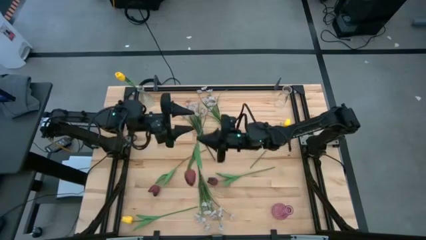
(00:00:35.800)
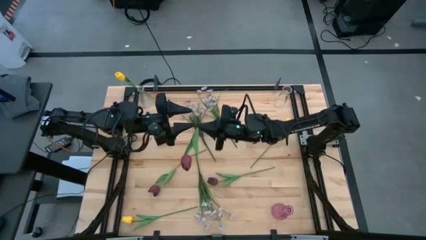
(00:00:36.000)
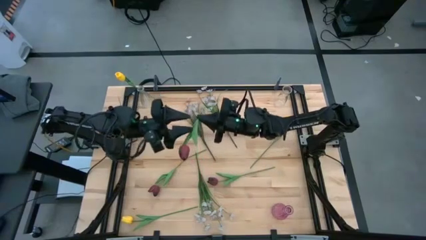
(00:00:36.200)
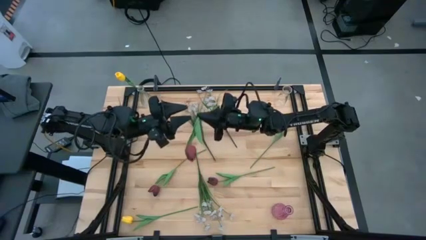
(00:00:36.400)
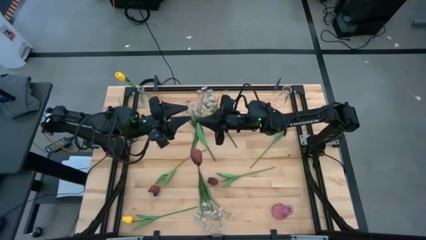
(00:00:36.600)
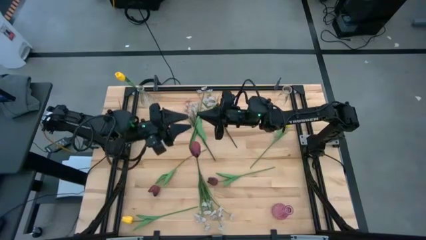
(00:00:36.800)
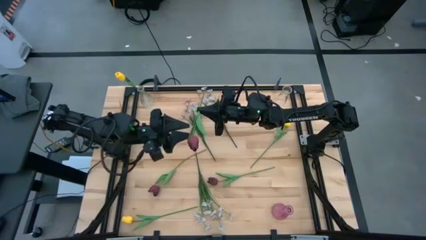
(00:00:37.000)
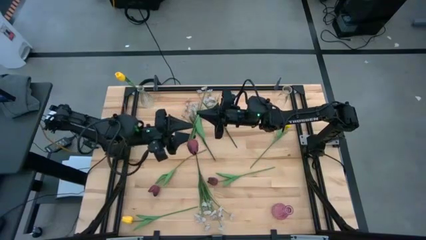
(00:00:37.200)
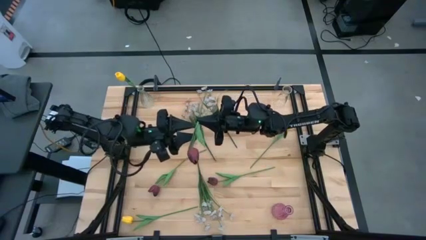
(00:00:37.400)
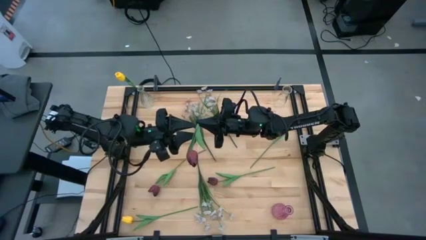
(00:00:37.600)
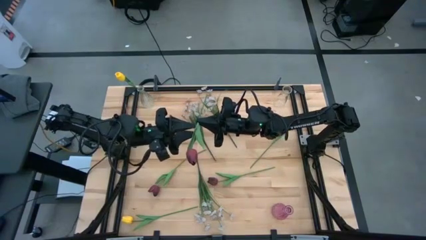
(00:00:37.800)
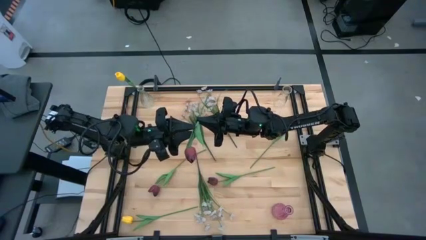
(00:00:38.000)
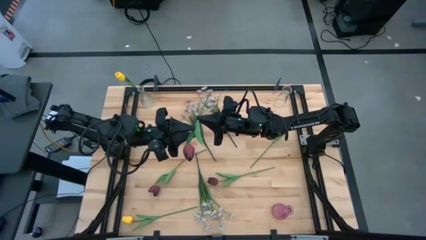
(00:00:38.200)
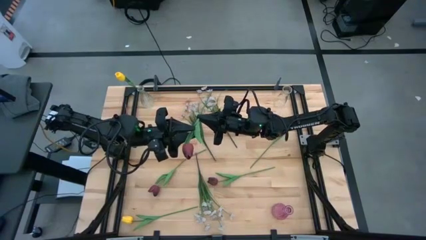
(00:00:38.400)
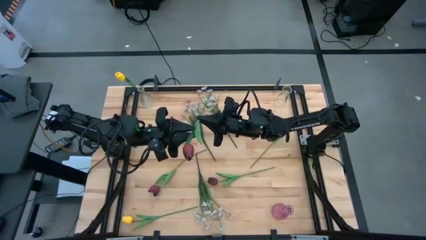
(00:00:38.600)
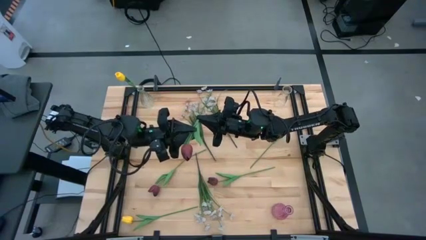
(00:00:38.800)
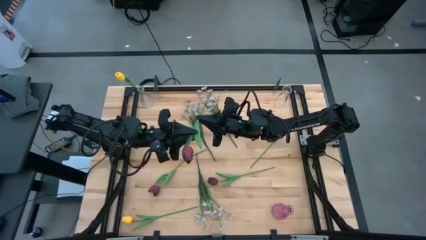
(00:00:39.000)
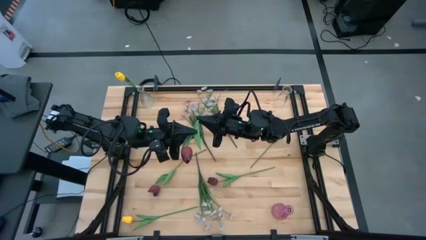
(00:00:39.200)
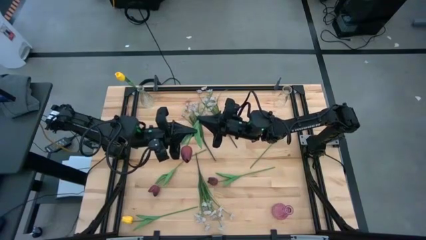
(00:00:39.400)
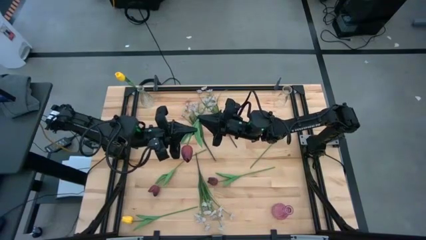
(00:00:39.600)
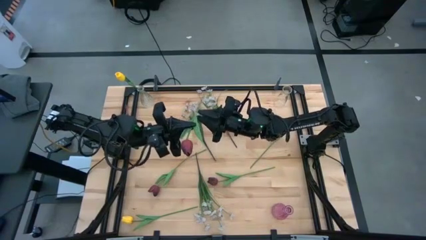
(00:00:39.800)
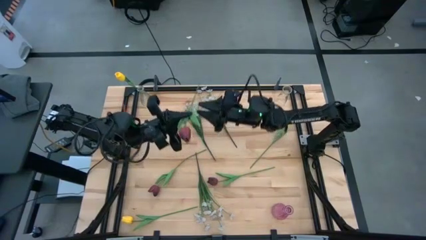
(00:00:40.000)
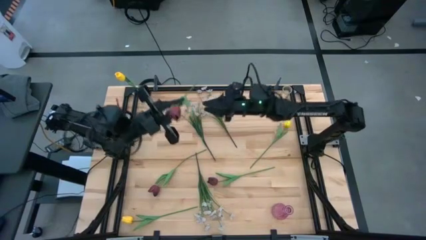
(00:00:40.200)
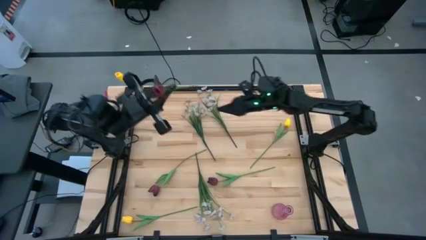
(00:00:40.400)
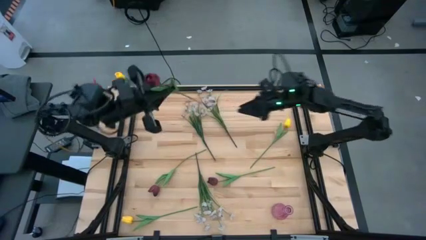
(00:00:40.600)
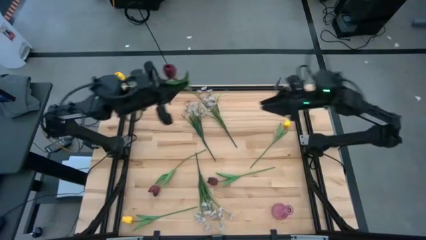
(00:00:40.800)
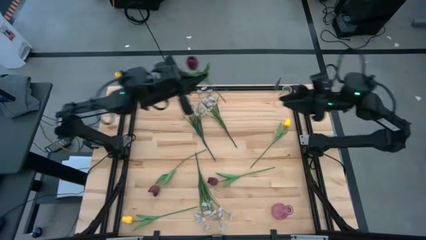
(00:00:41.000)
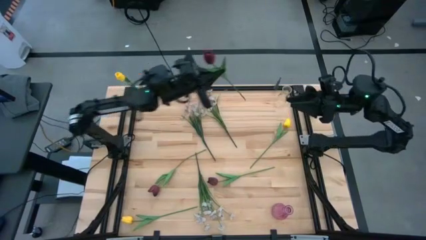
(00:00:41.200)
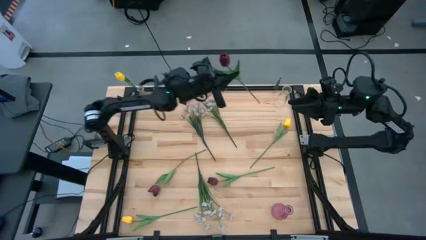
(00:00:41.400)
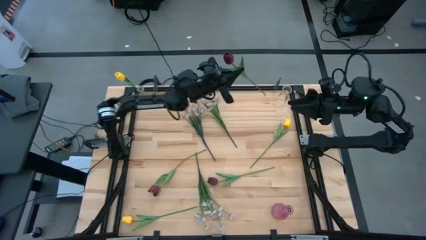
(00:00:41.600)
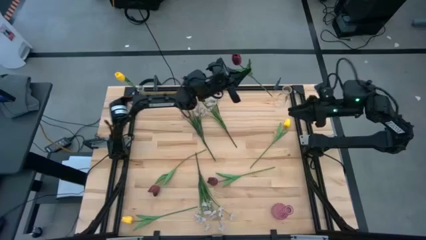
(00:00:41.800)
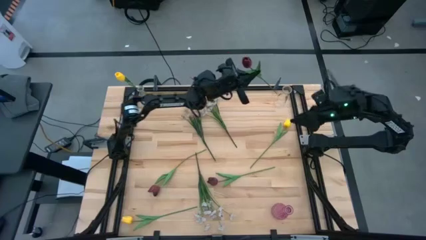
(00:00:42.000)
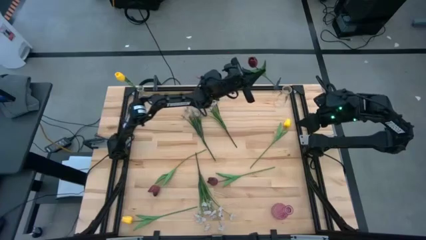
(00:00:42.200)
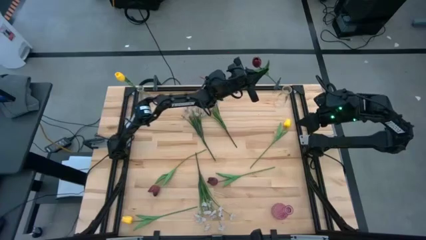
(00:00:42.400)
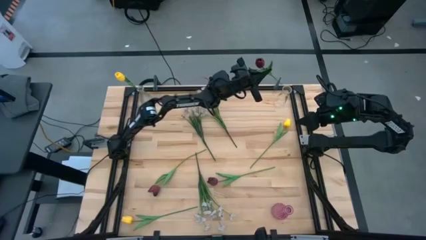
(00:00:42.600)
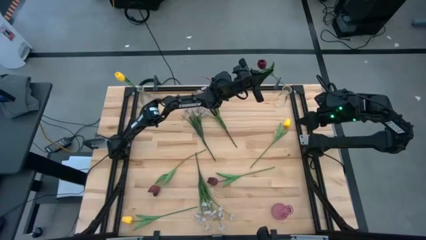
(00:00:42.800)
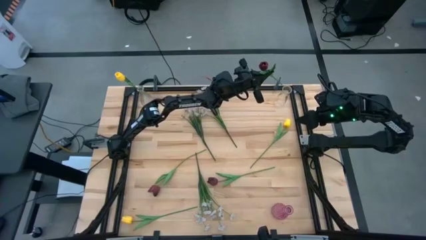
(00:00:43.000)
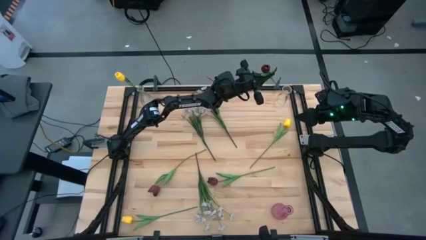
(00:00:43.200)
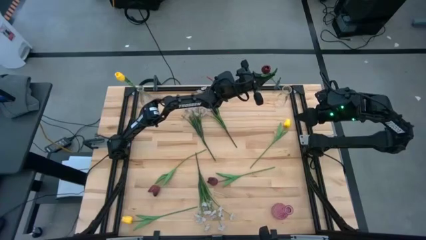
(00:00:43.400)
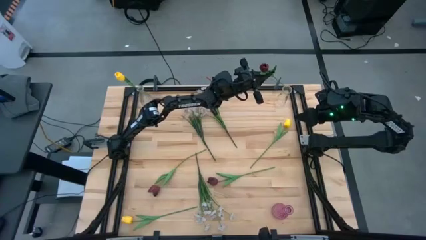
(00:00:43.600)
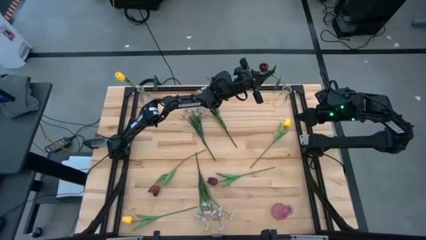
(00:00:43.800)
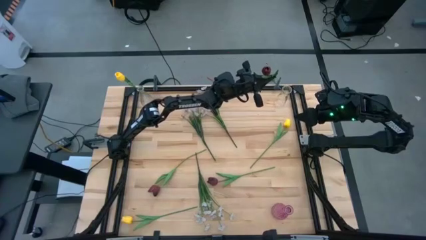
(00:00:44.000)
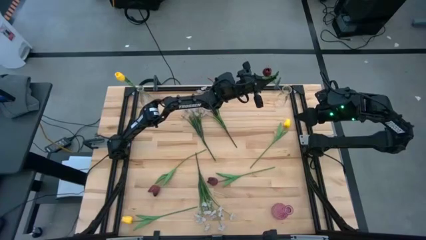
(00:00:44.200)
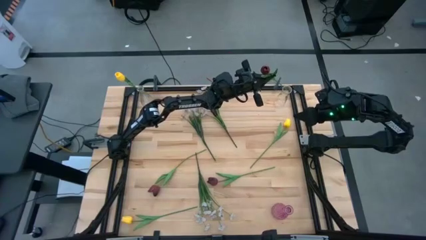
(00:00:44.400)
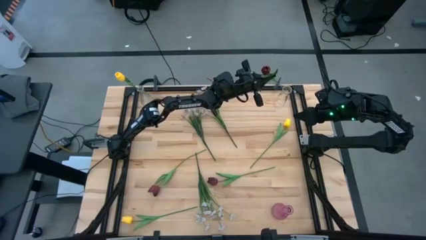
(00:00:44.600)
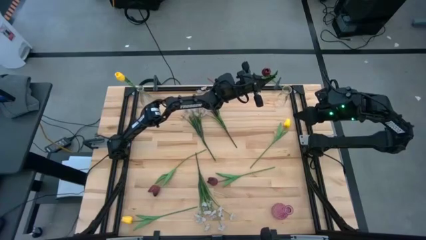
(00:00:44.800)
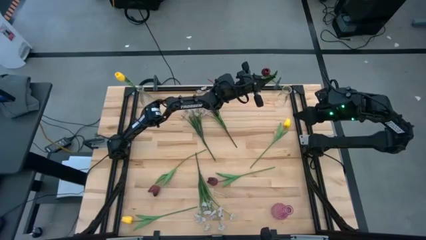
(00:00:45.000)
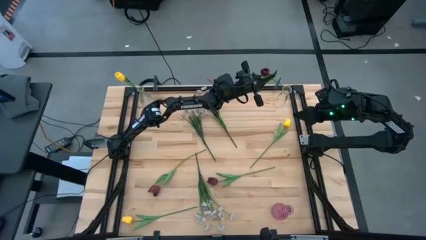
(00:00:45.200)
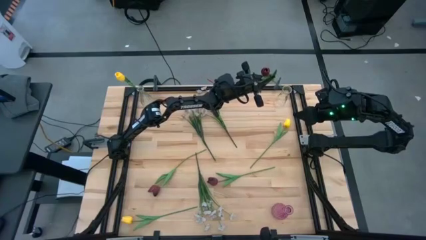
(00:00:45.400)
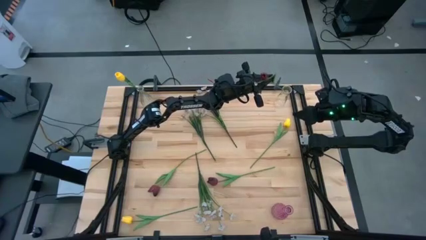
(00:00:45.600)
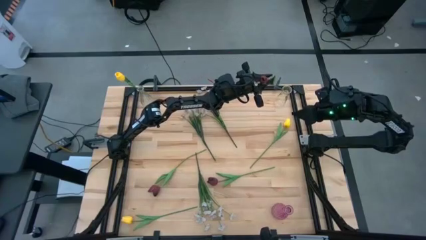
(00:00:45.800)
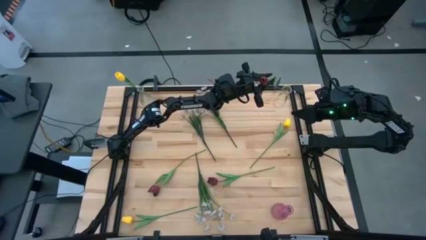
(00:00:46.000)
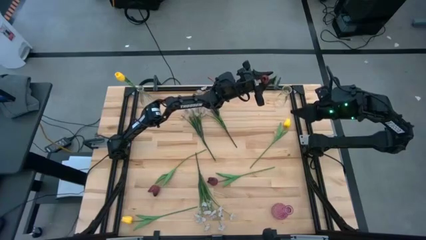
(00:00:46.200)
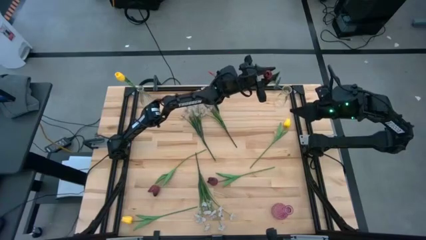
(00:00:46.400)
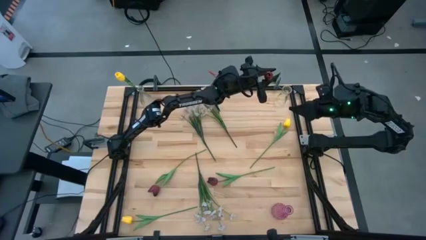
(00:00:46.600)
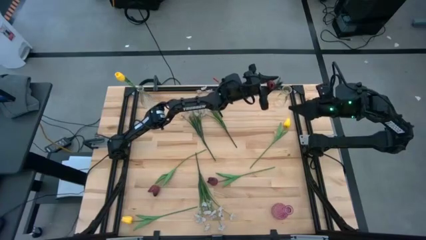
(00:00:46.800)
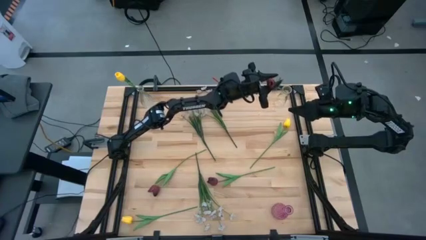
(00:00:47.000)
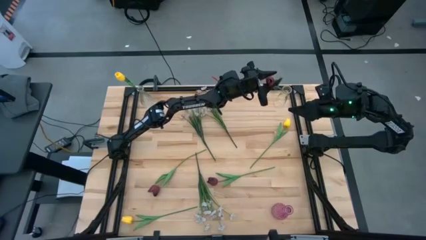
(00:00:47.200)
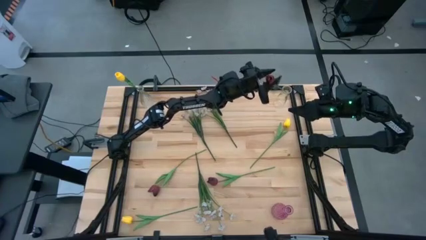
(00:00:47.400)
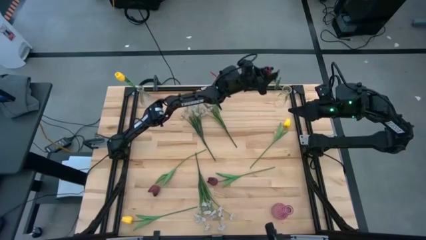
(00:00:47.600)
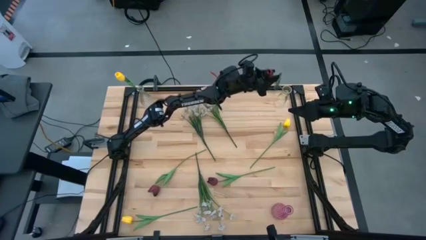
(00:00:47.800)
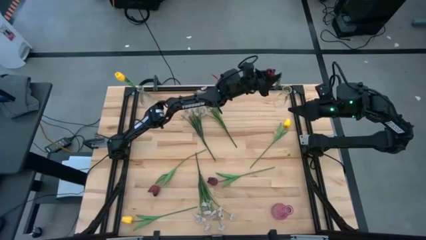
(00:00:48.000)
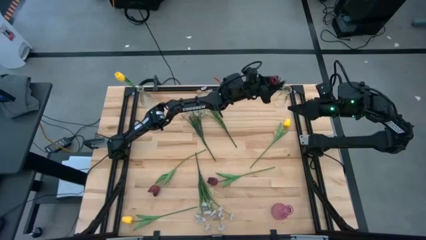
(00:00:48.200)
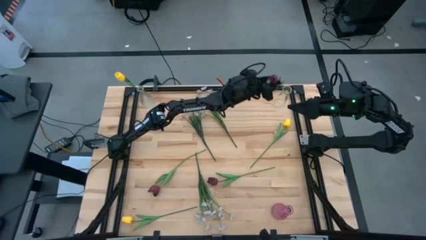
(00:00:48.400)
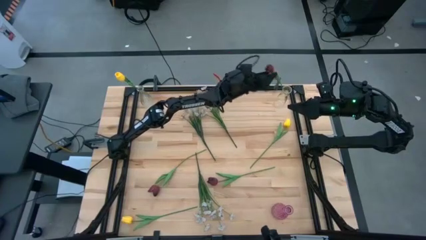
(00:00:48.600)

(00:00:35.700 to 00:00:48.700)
Task: Sort flowers into vase by color
Put the bottom red flower into the right transparent vase
